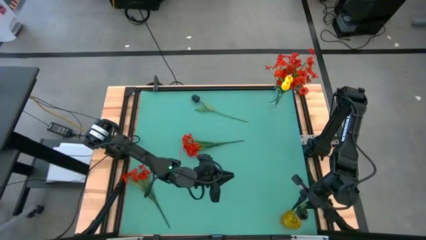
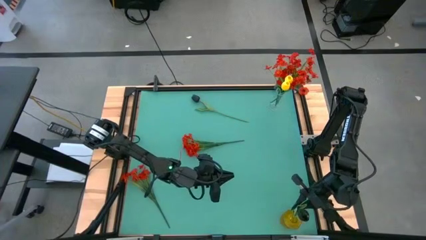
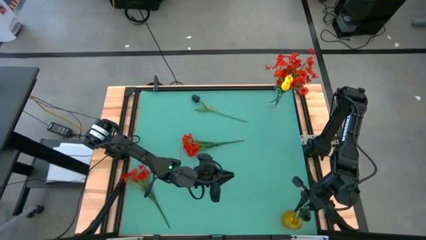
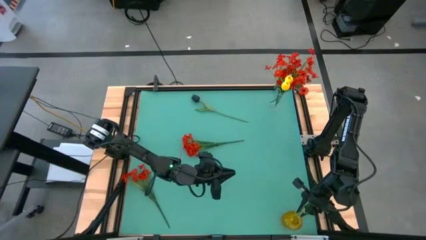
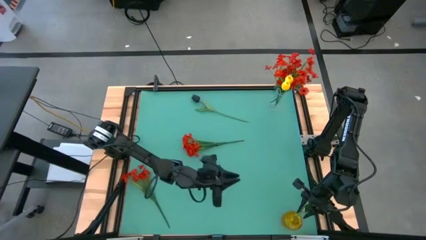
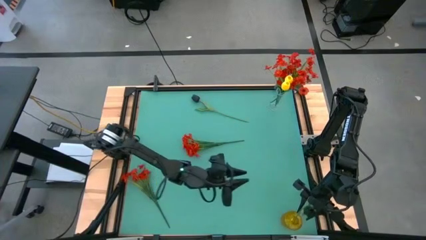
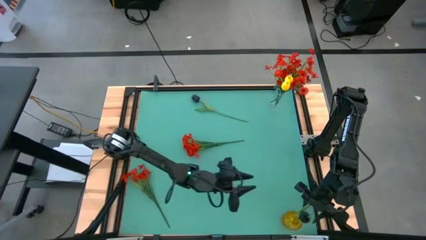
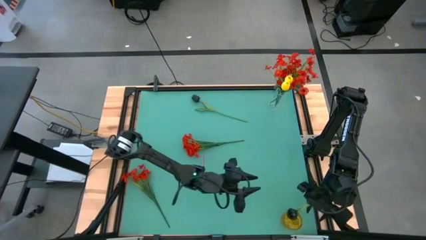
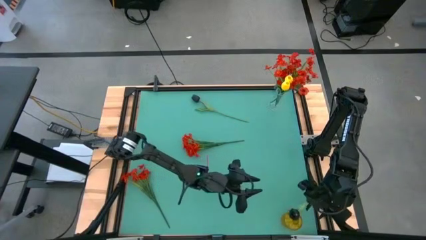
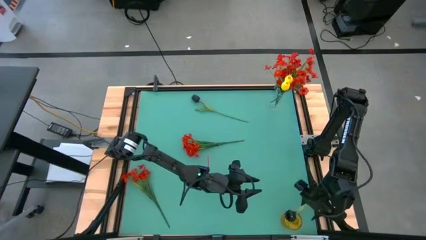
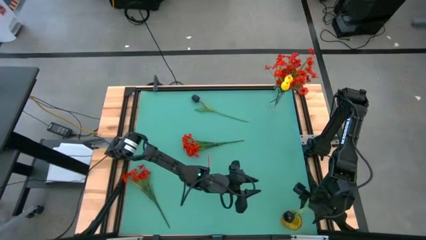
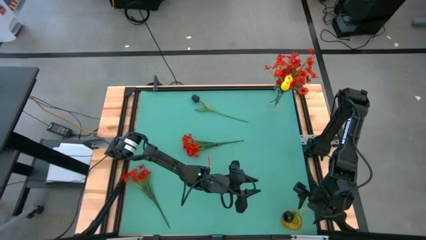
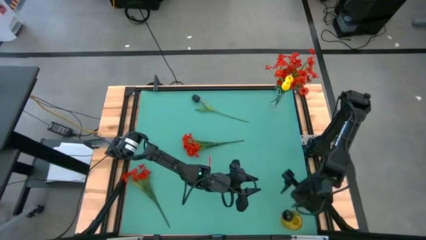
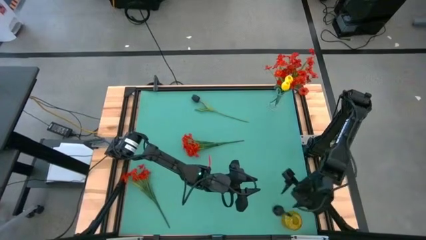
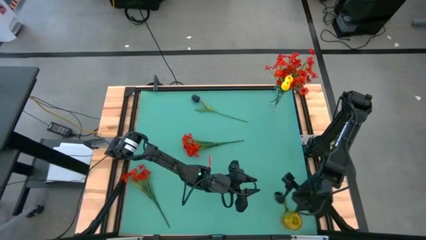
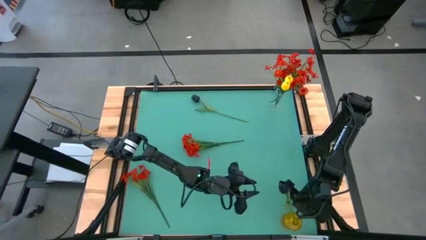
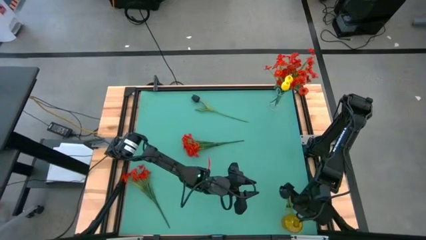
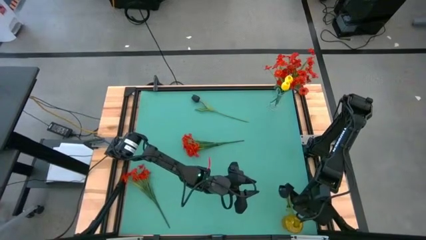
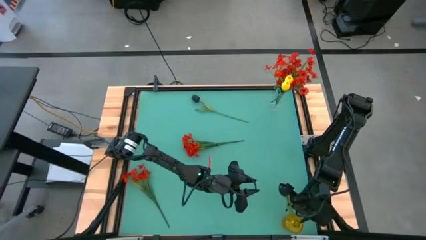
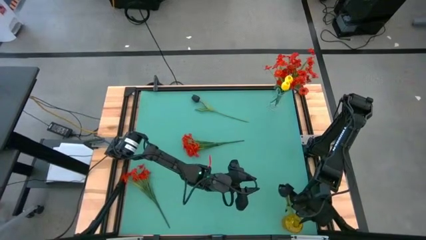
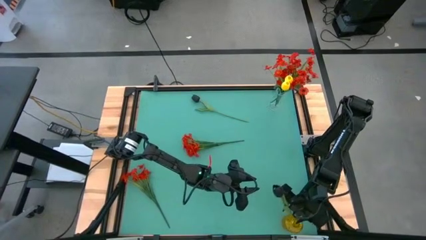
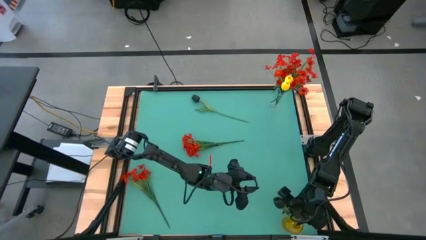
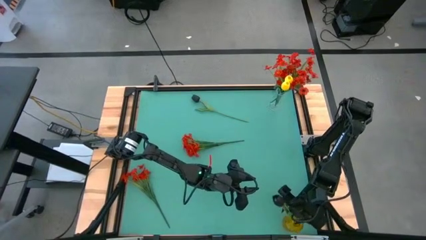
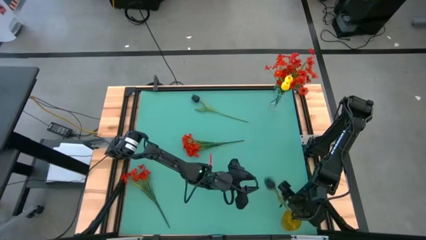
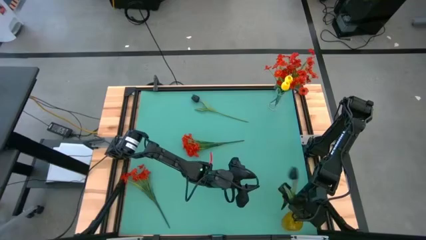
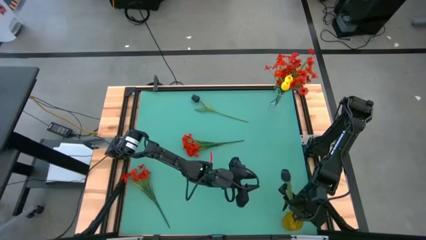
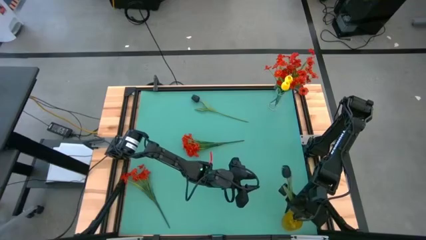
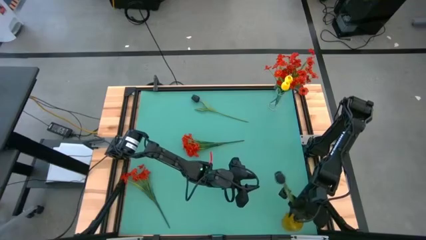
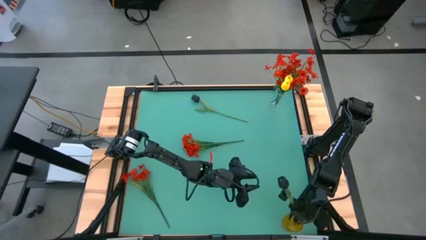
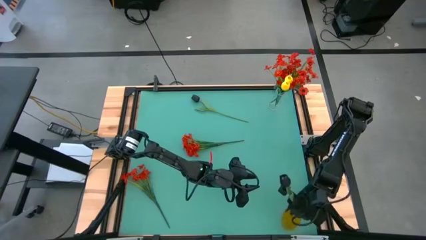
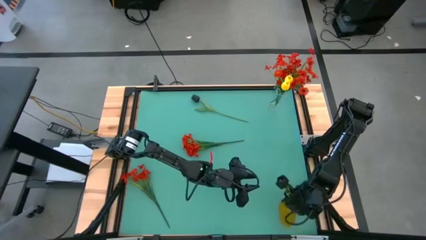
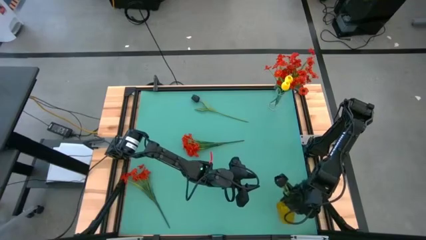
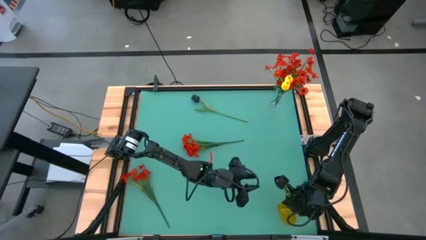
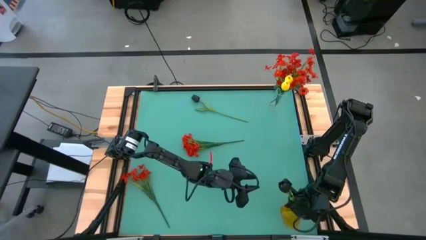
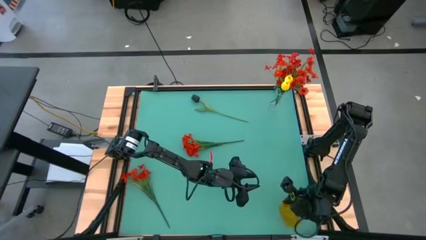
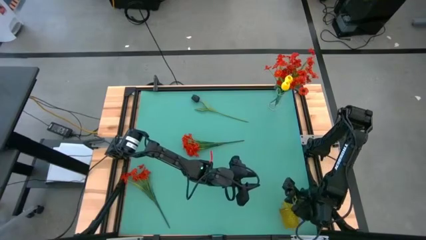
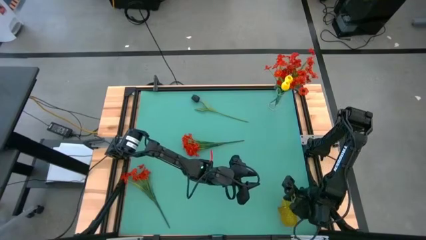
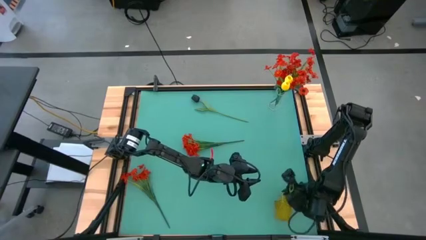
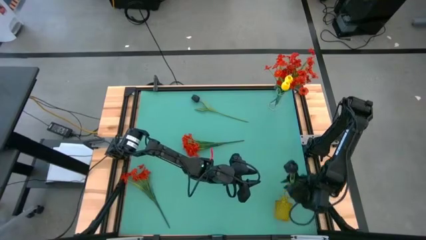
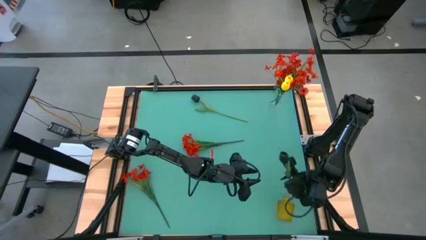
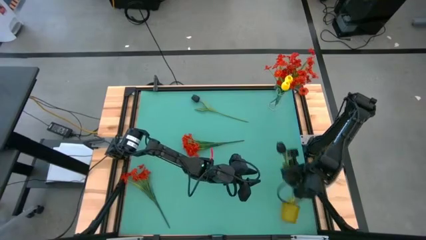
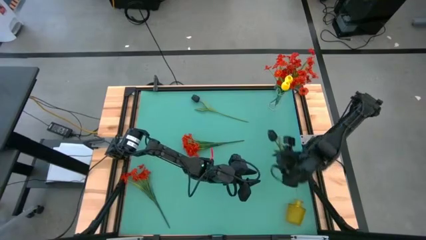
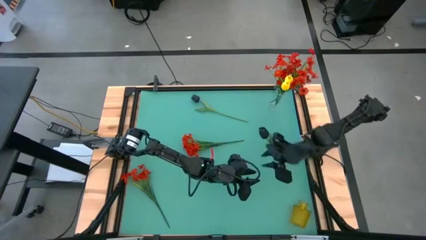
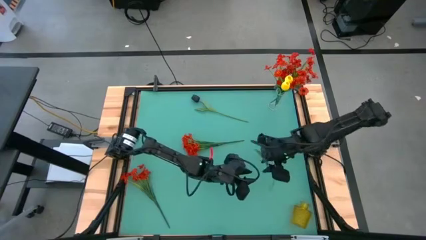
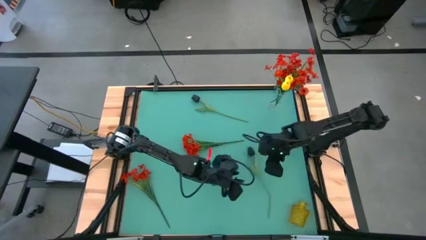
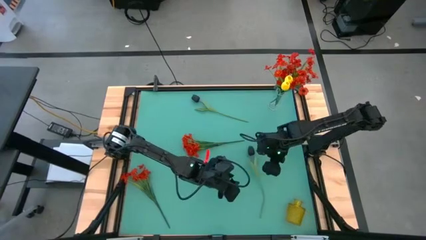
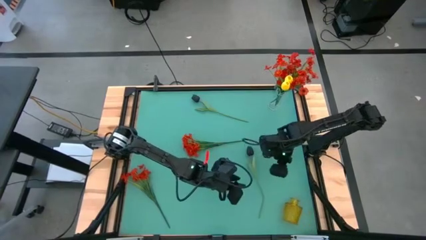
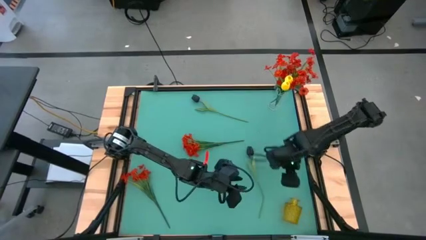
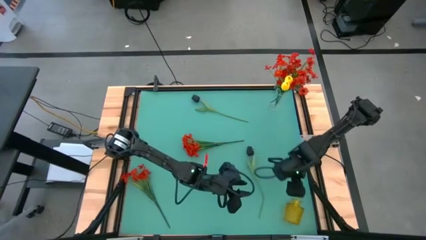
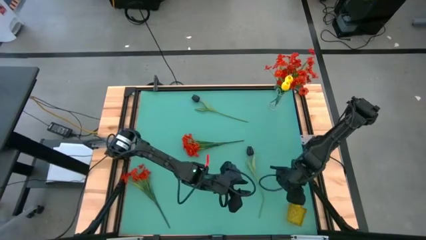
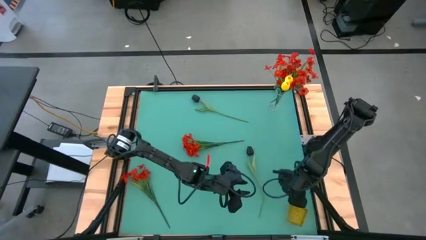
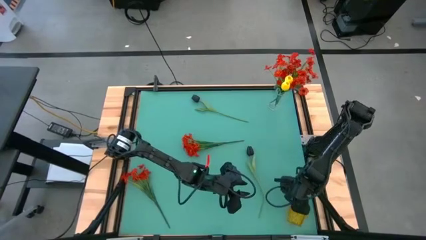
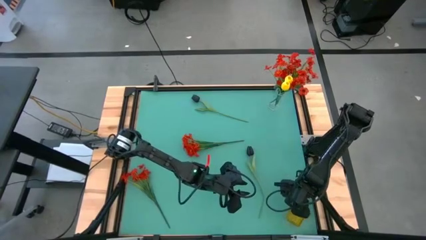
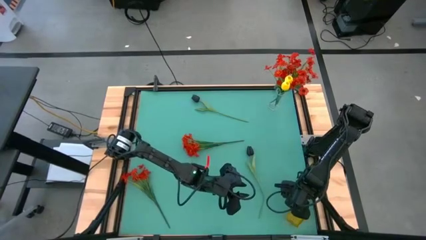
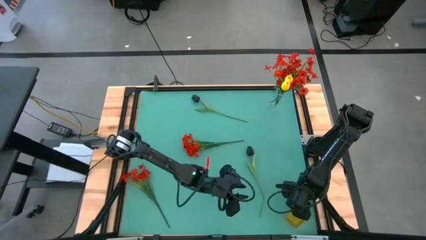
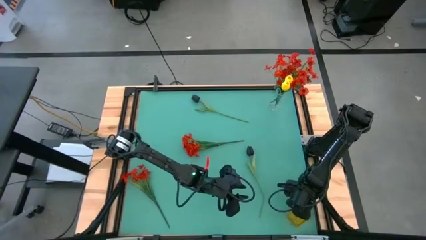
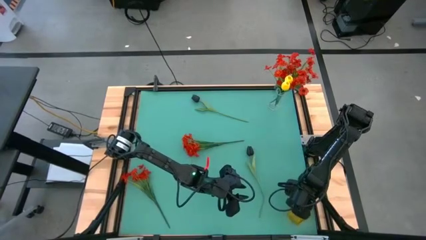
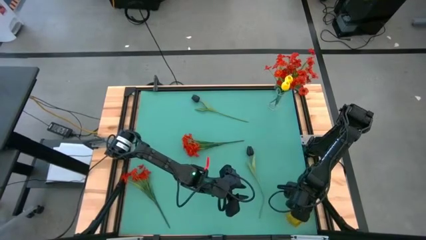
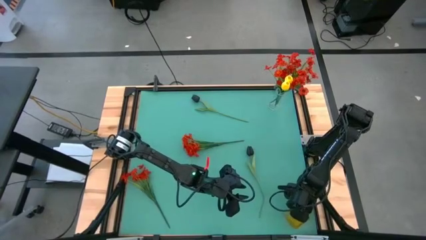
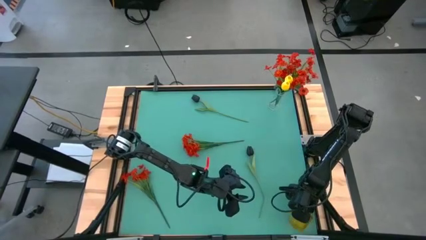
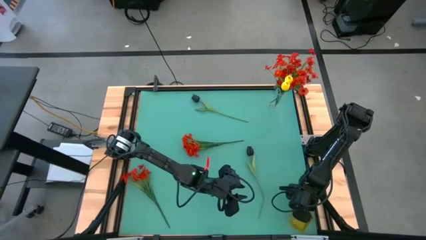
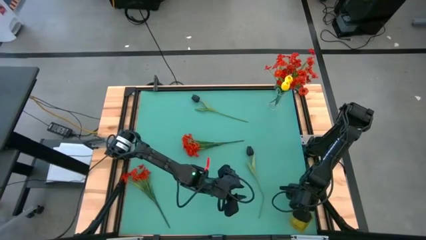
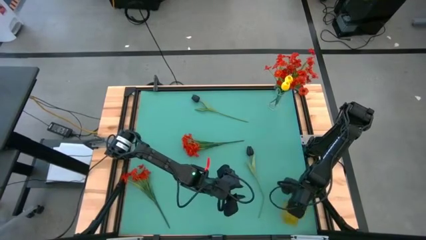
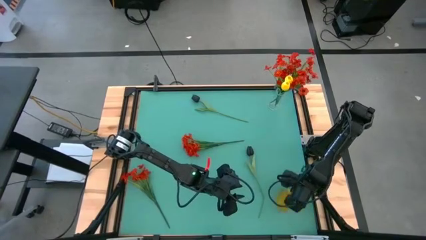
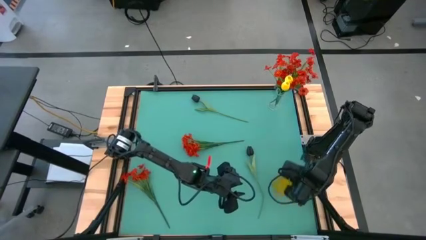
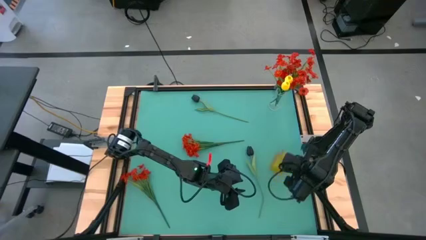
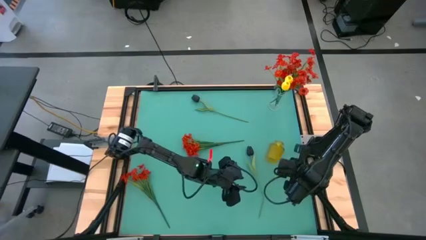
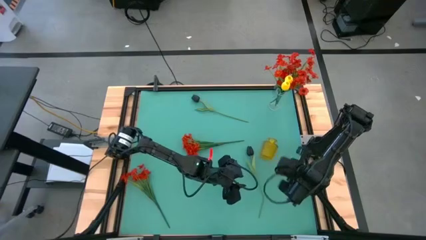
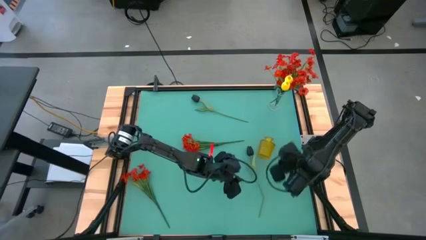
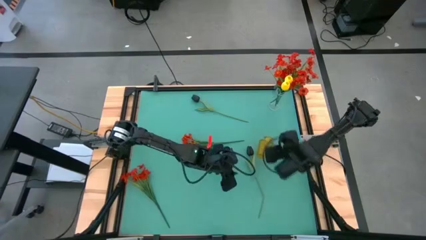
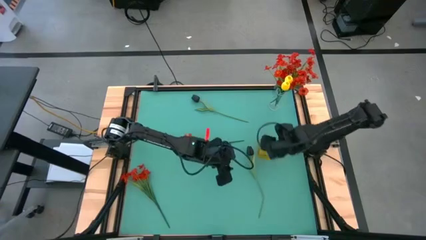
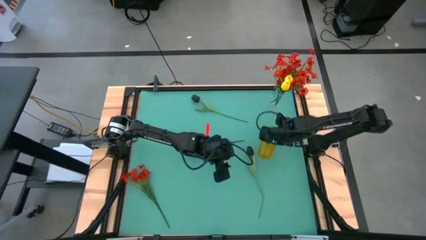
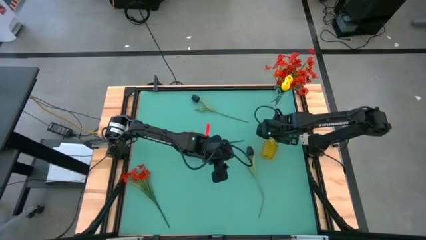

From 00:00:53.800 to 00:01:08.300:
Task: Sort flowers into vase by color
Put the bottom black flower into the yellow vase

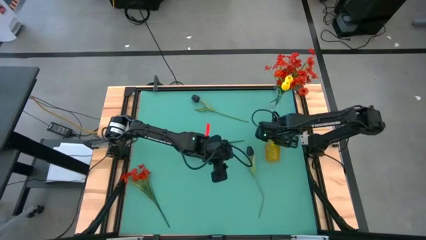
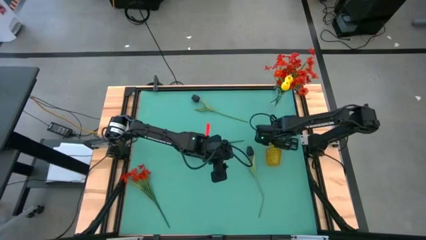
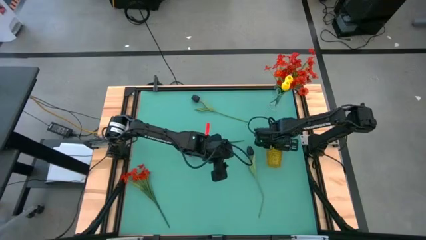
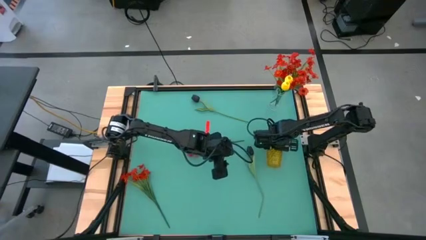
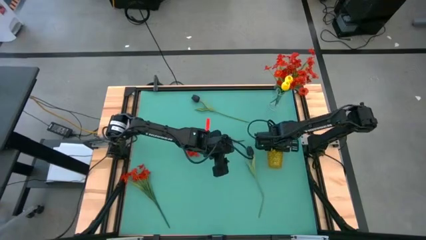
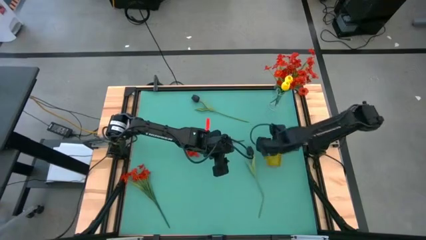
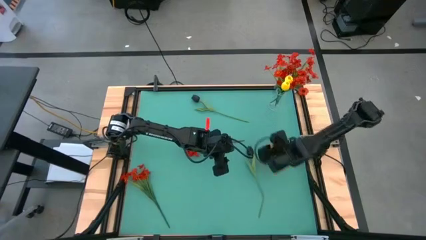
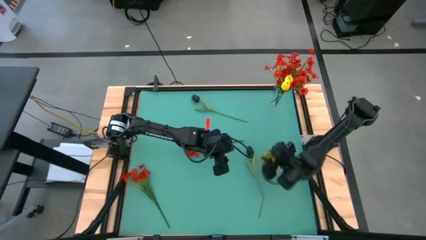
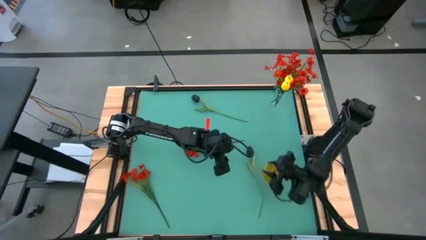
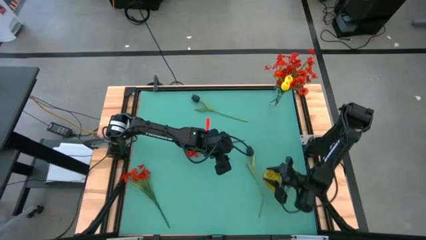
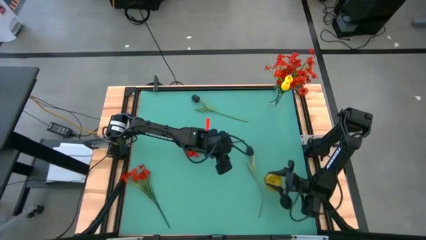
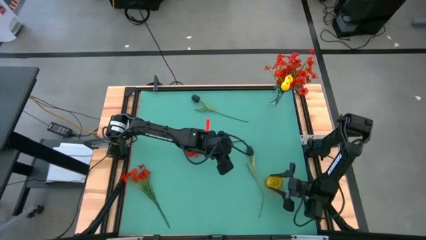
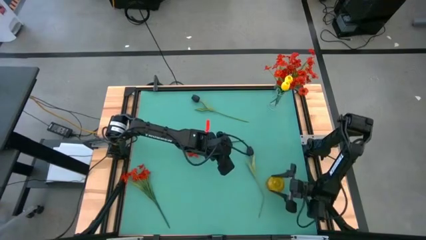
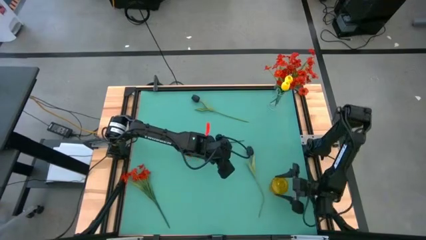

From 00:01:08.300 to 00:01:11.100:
Adjust the yellow vase on the table
